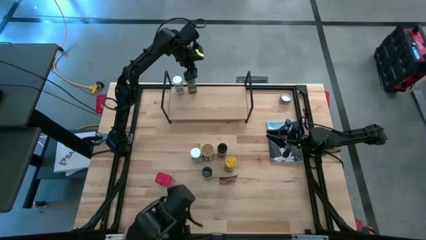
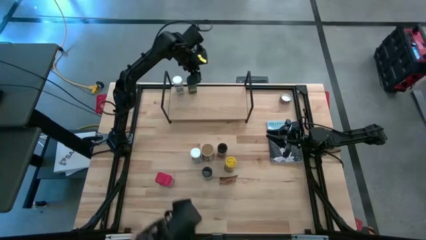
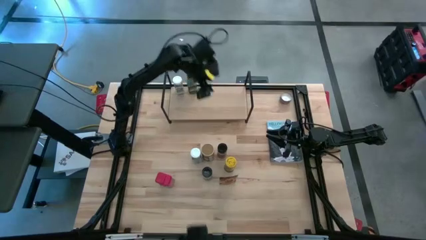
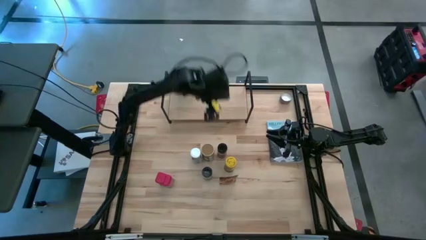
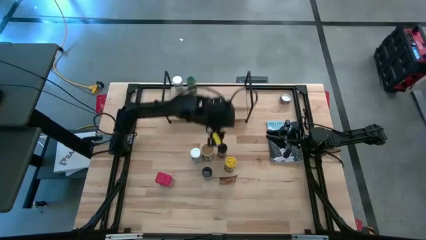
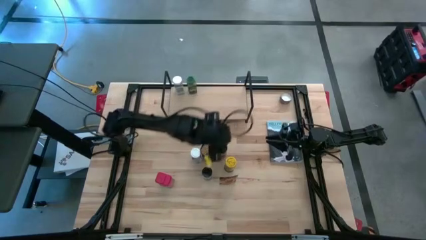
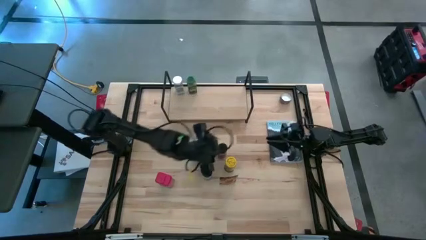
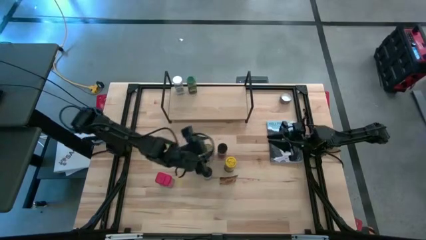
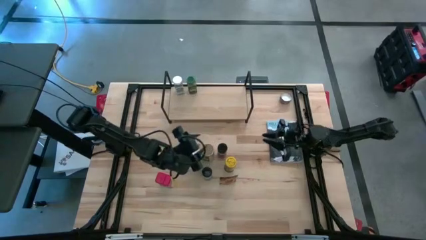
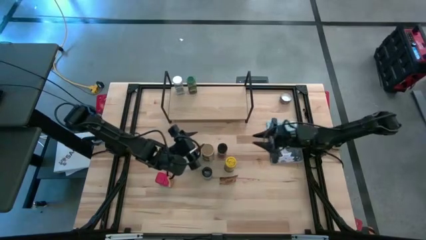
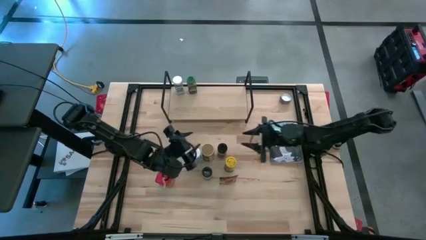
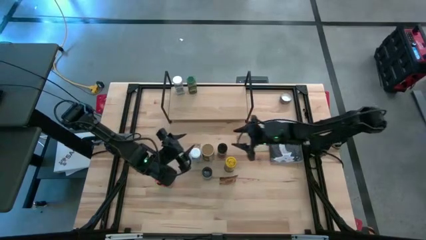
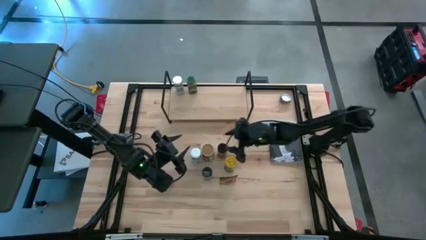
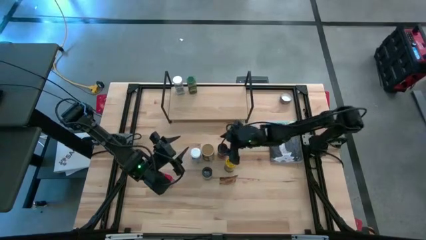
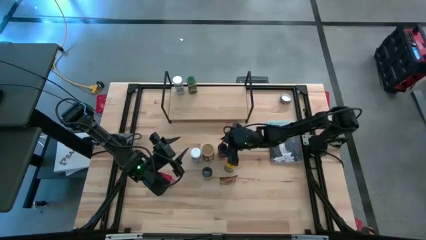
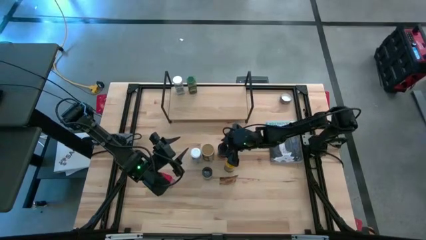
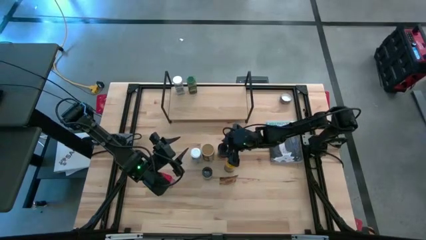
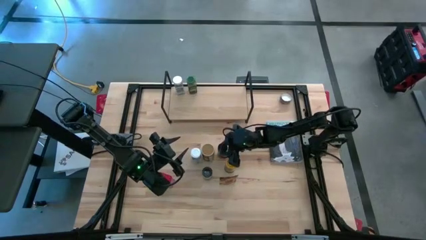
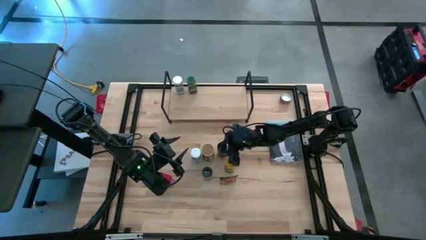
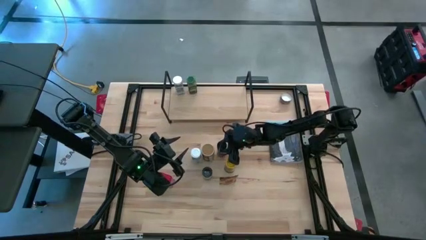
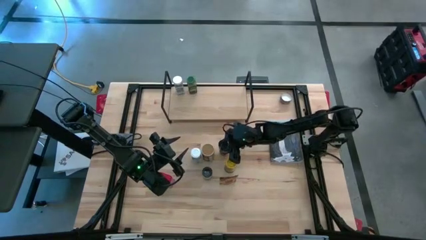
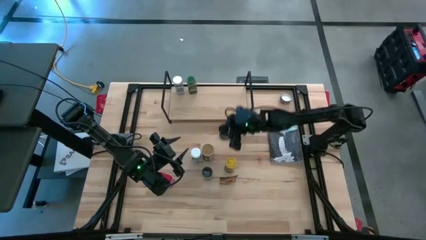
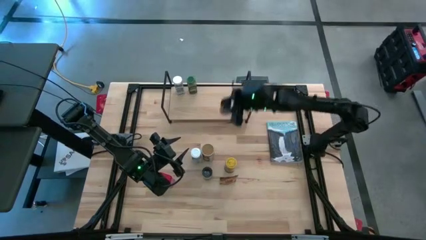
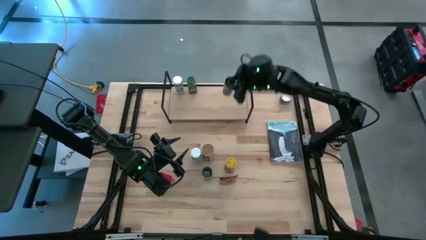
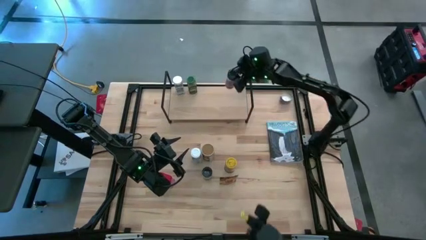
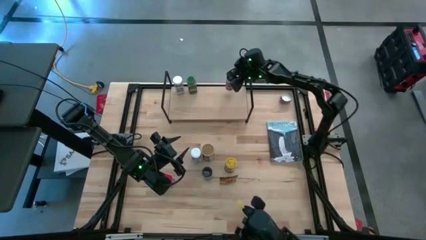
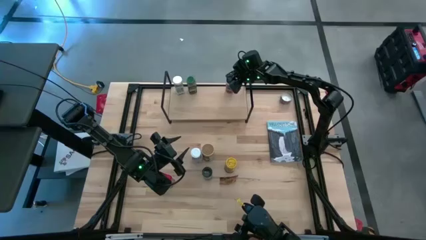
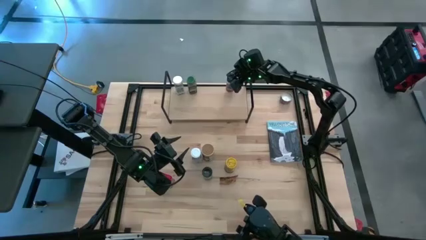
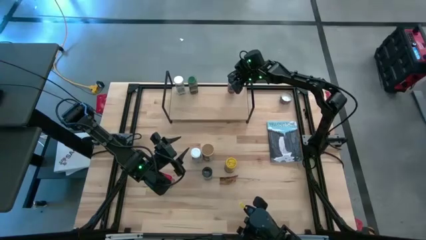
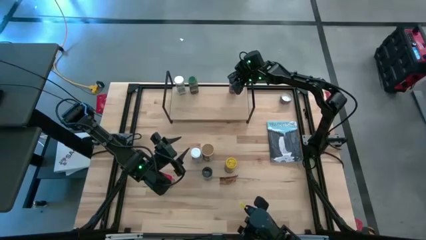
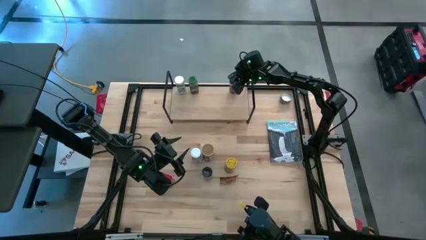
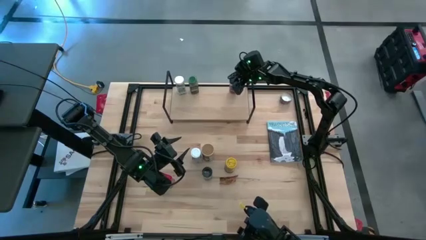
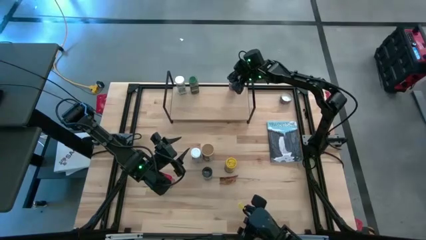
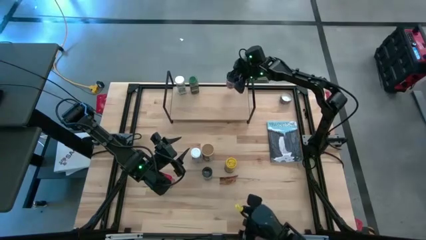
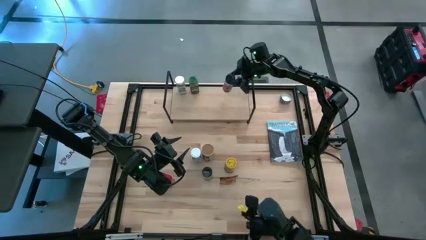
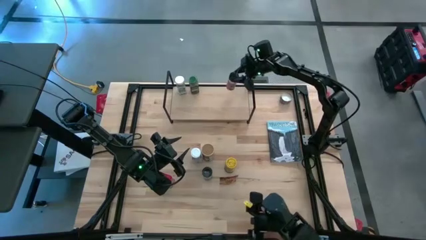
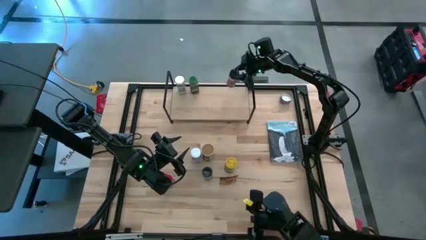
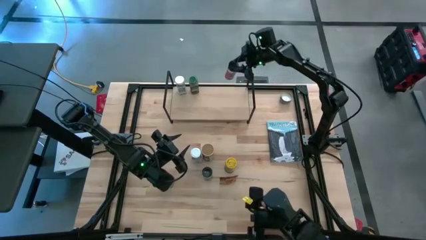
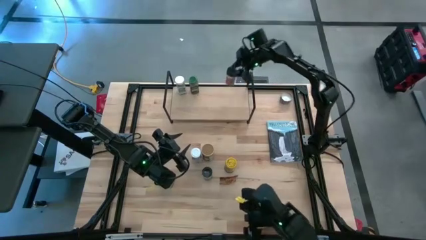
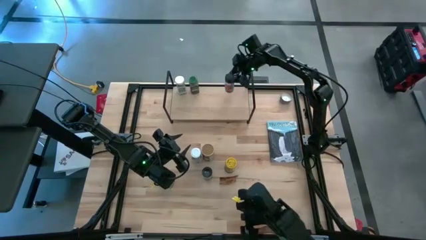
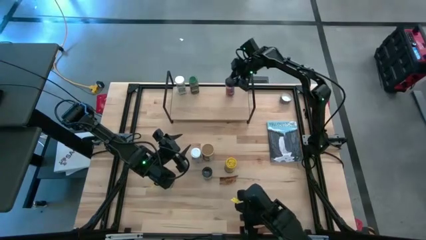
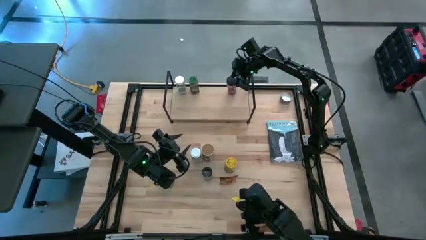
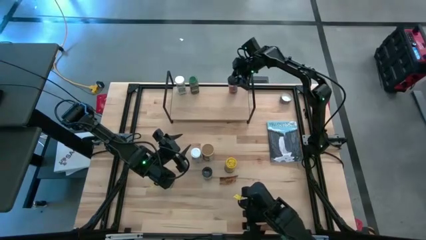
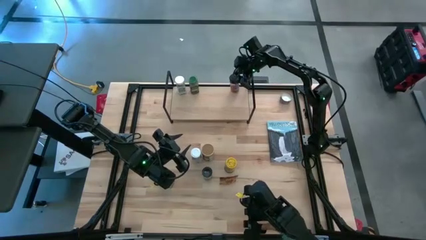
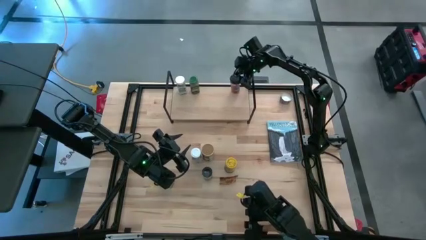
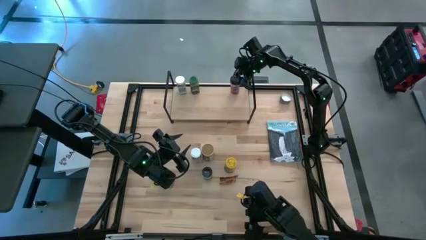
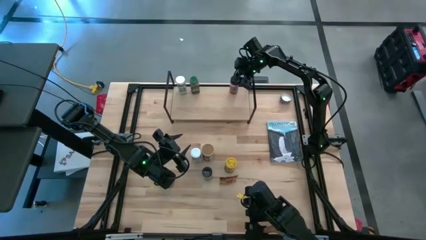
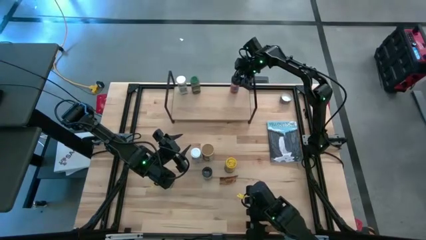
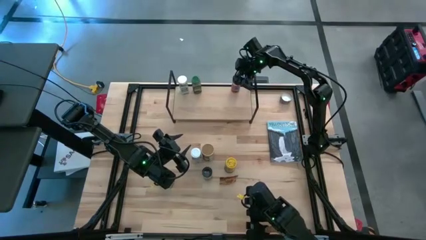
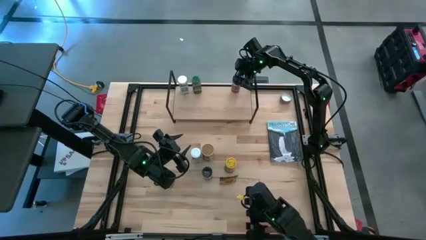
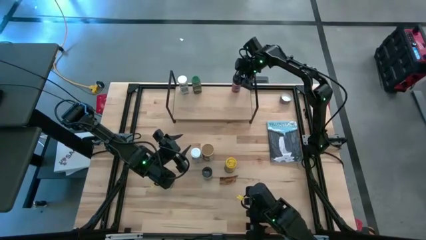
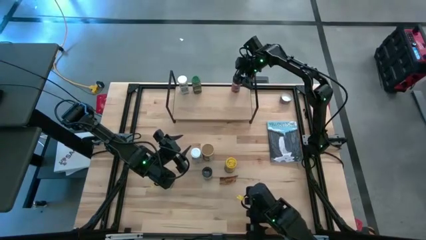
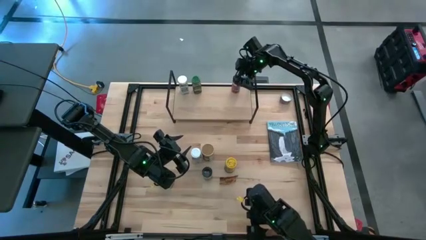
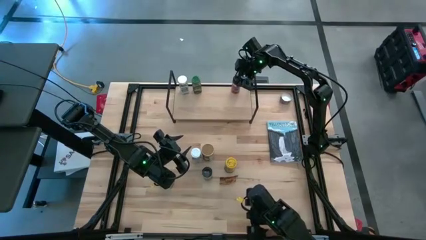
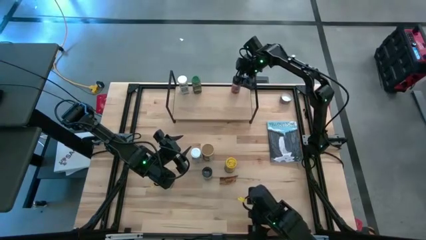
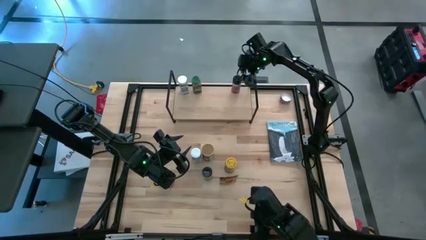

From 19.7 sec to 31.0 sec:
Task: Shelf spices
Put the top black seasoning bottle on the shelf

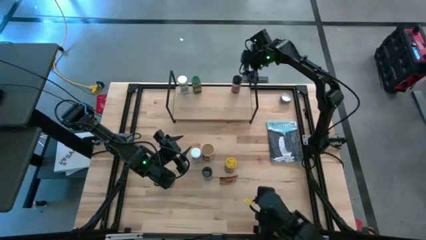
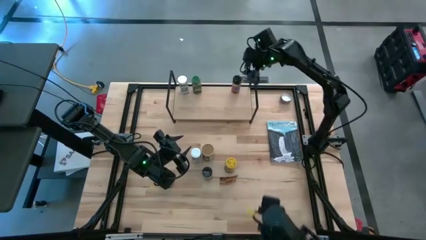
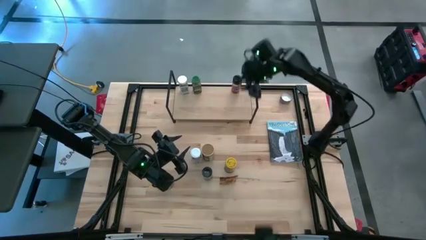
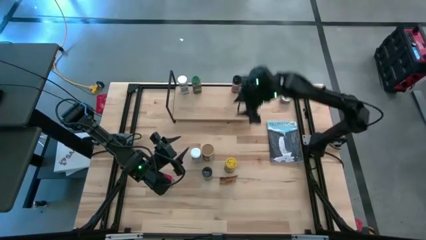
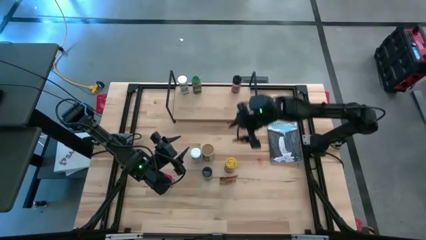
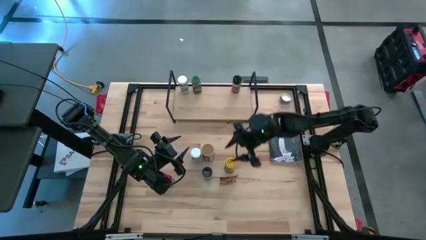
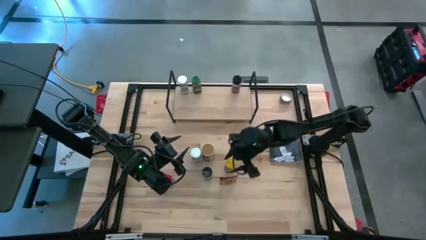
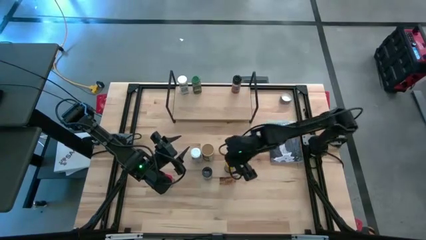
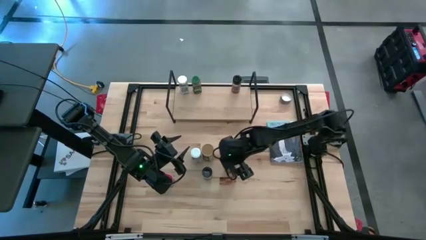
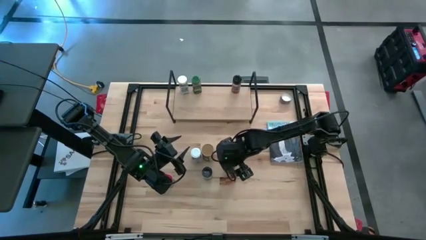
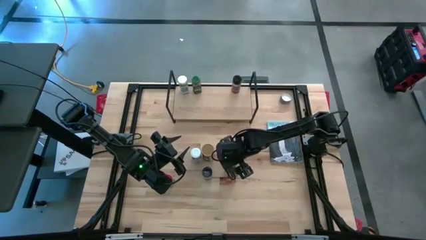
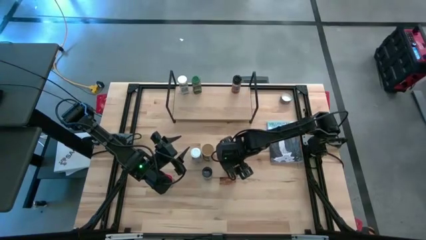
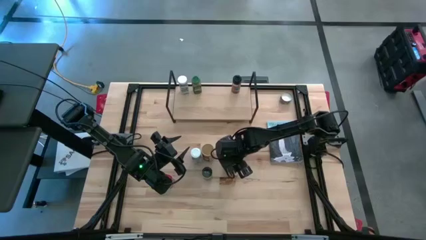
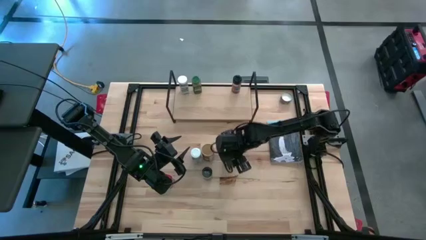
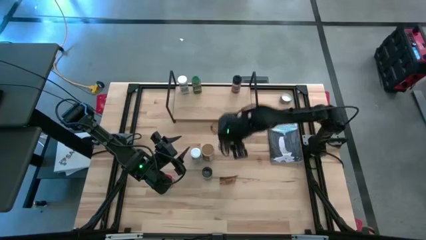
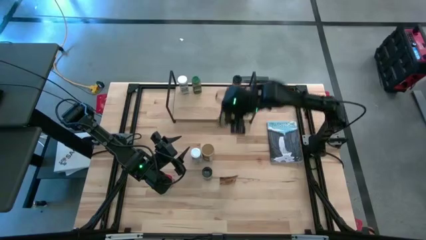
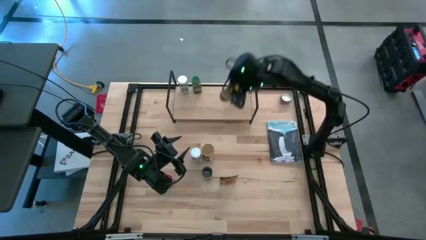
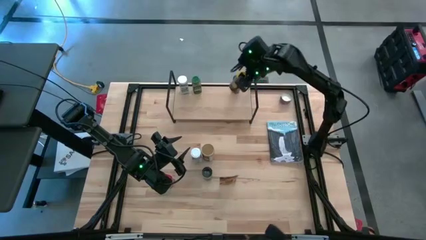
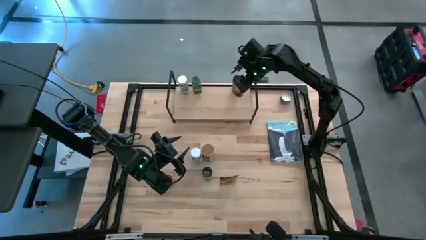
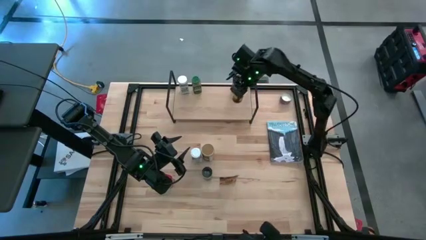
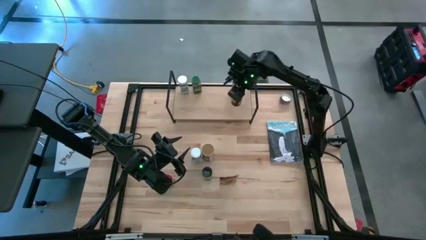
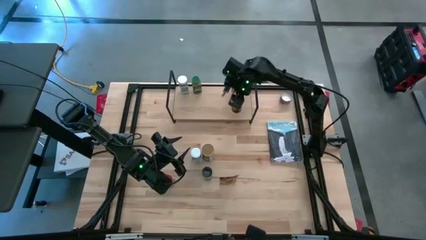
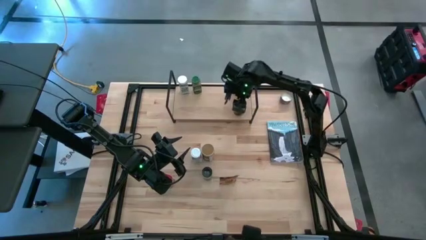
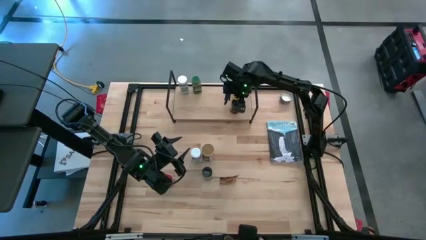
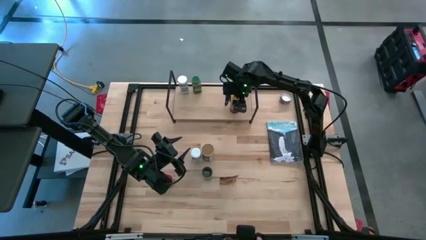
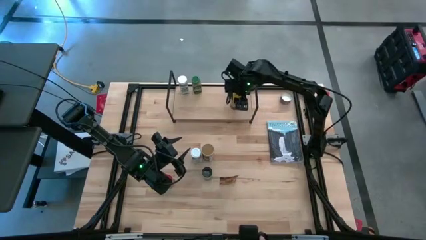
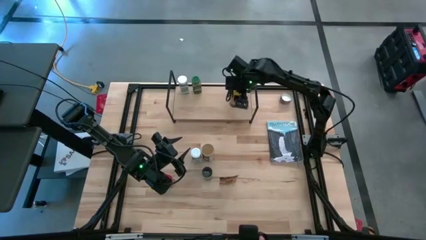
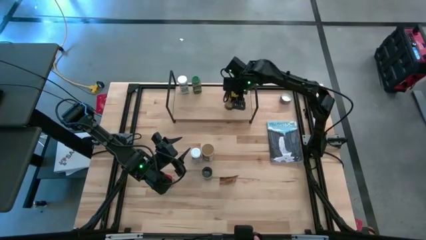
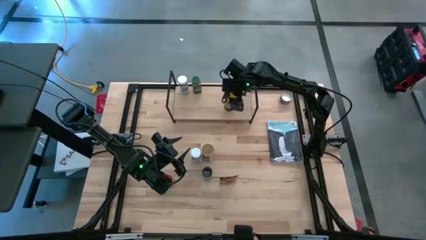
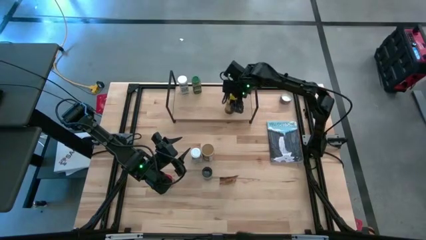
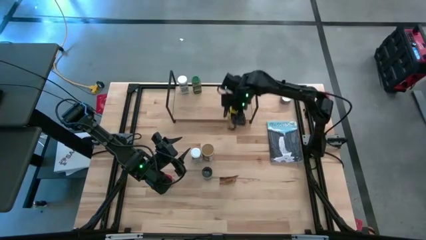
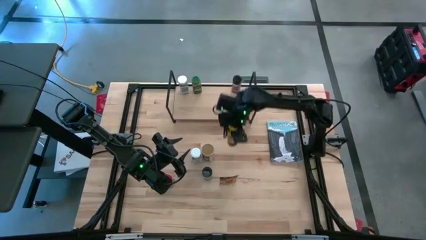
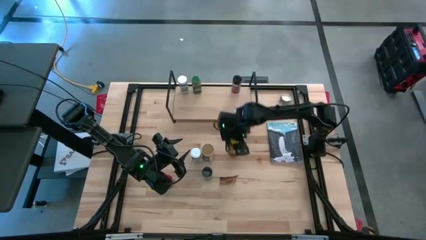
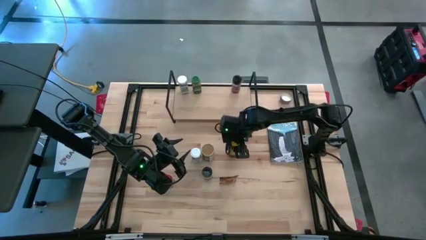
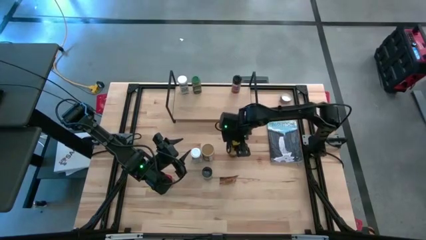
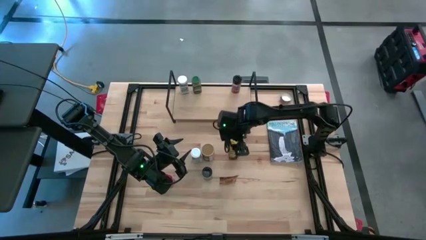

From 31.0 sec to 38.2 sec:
Put the yellow seasoning bottle on the shelf
